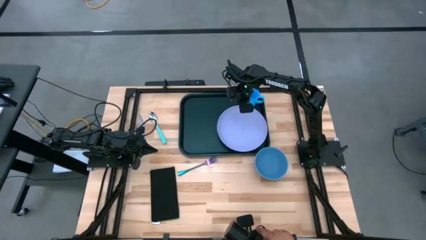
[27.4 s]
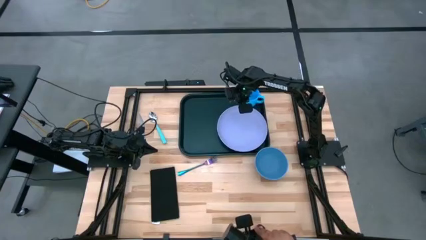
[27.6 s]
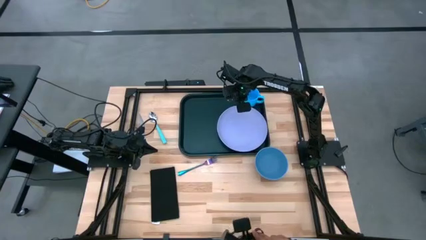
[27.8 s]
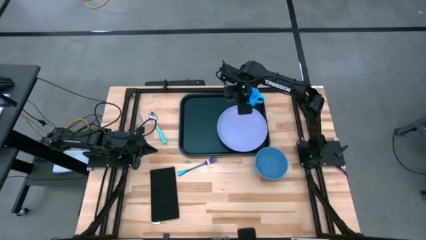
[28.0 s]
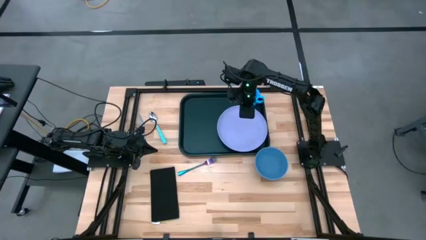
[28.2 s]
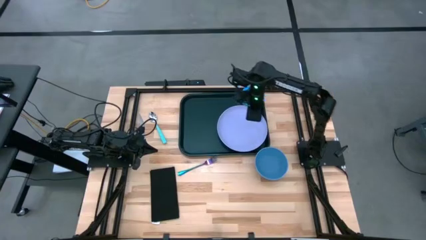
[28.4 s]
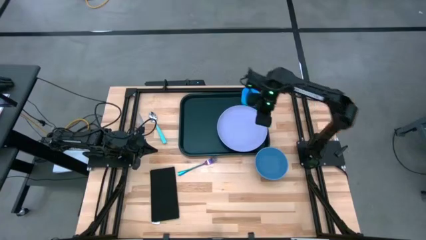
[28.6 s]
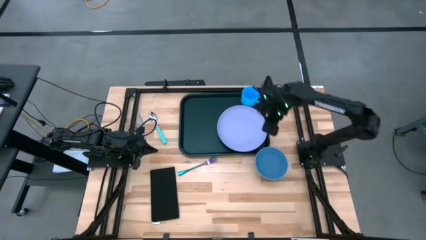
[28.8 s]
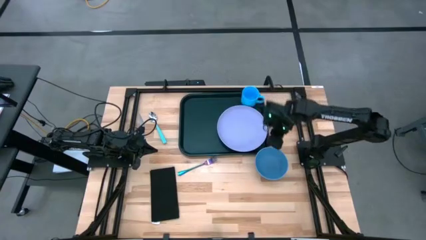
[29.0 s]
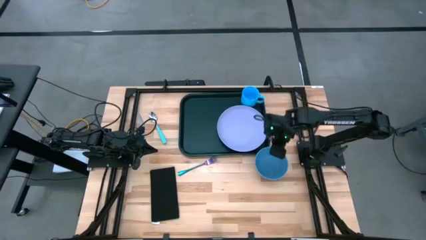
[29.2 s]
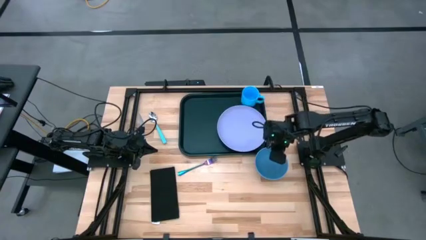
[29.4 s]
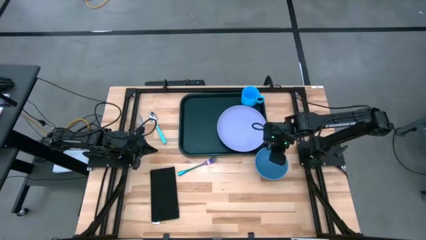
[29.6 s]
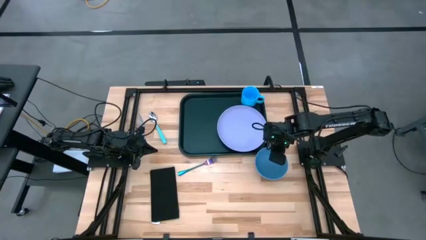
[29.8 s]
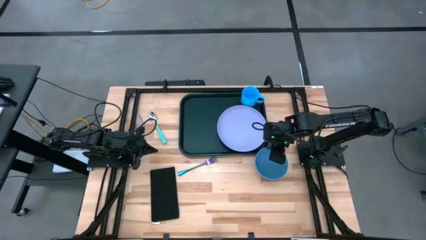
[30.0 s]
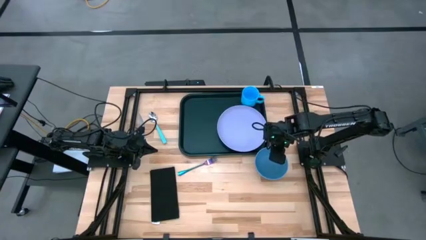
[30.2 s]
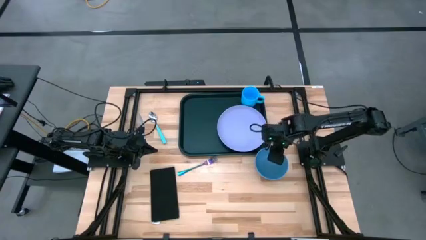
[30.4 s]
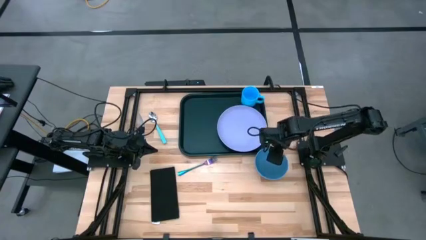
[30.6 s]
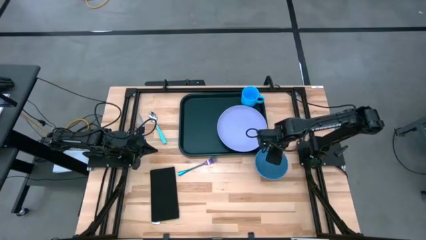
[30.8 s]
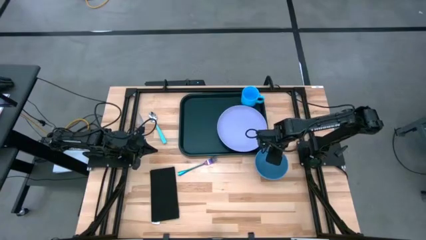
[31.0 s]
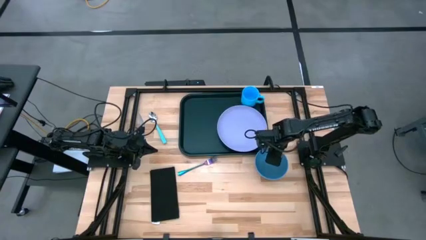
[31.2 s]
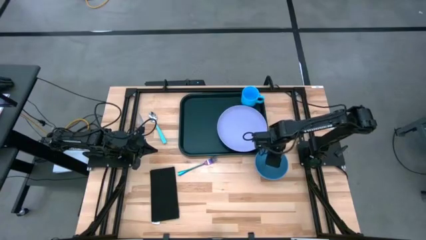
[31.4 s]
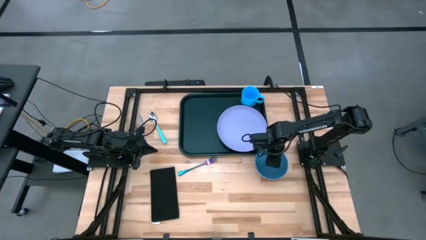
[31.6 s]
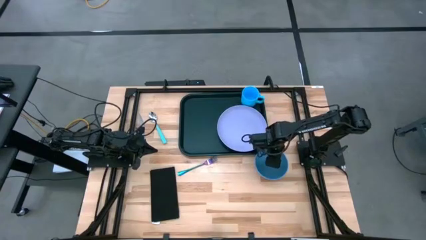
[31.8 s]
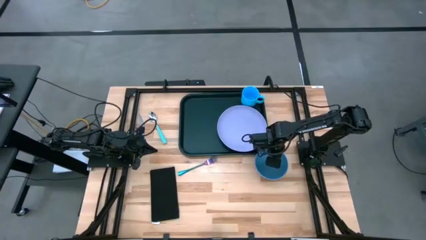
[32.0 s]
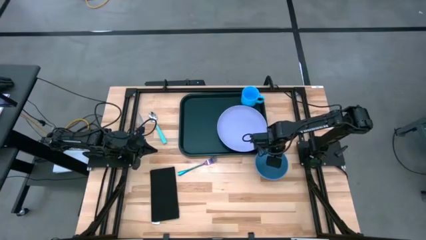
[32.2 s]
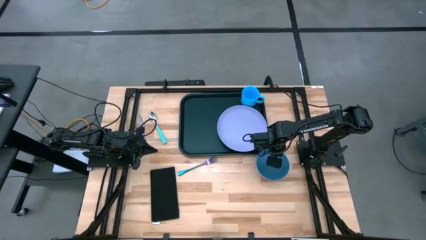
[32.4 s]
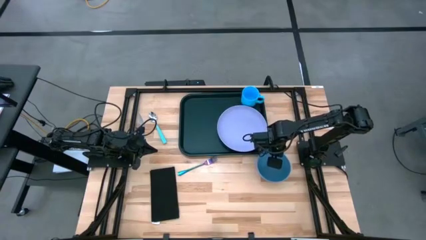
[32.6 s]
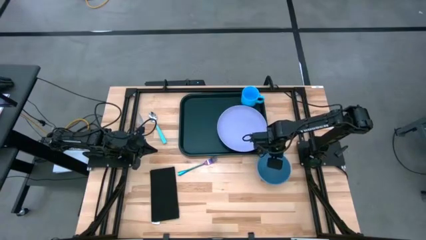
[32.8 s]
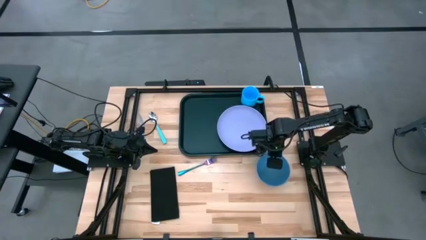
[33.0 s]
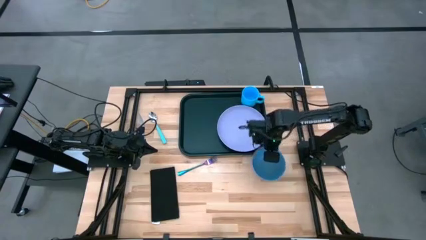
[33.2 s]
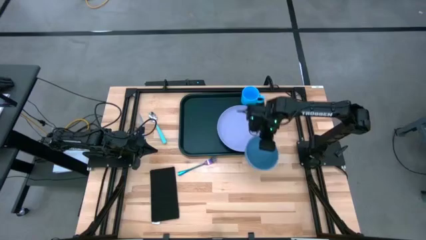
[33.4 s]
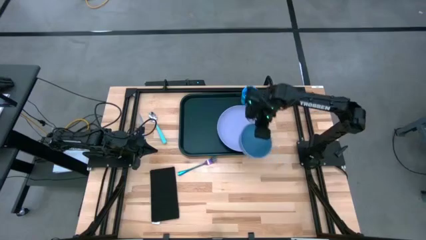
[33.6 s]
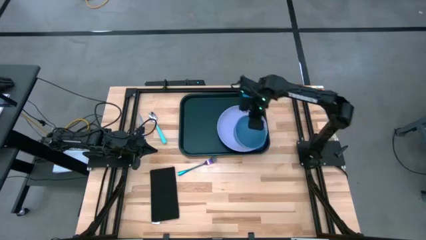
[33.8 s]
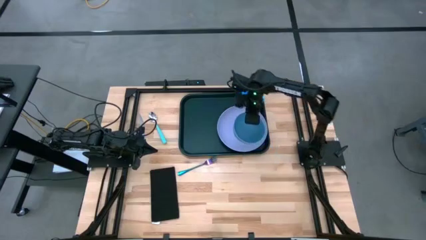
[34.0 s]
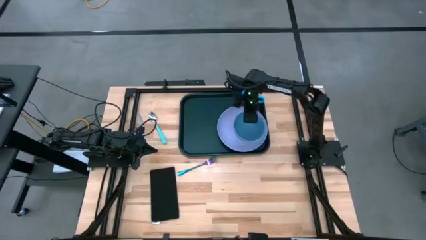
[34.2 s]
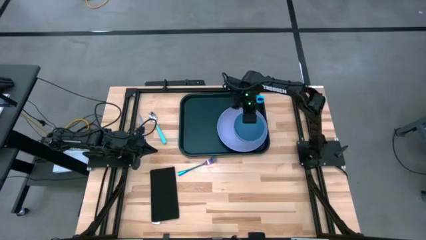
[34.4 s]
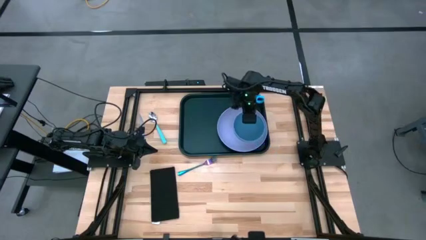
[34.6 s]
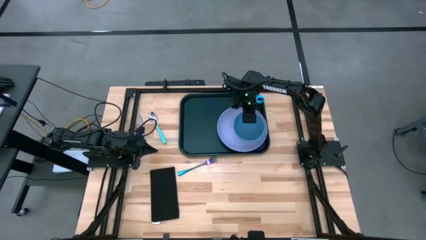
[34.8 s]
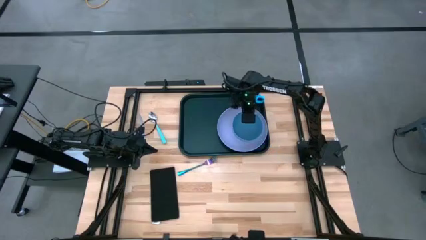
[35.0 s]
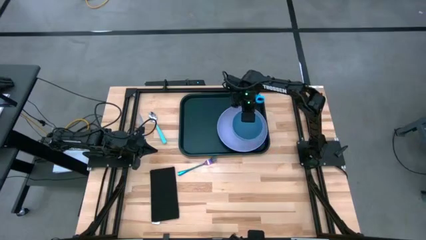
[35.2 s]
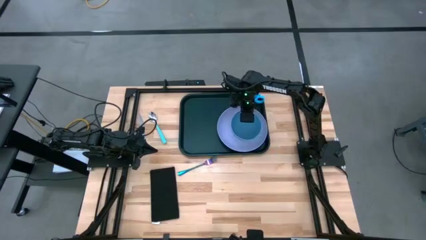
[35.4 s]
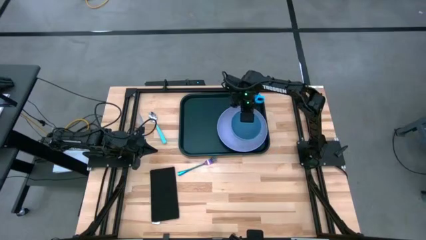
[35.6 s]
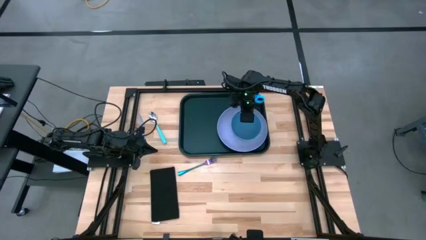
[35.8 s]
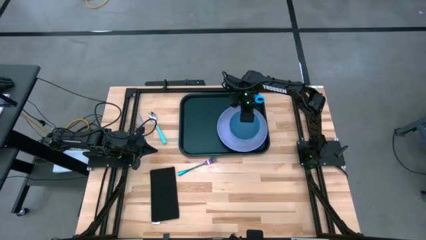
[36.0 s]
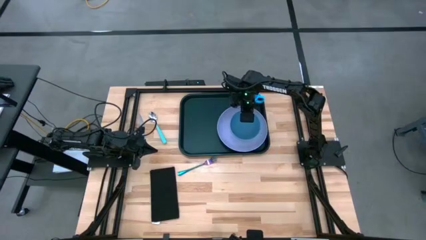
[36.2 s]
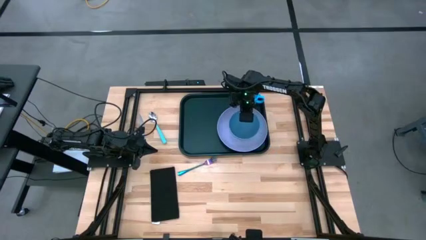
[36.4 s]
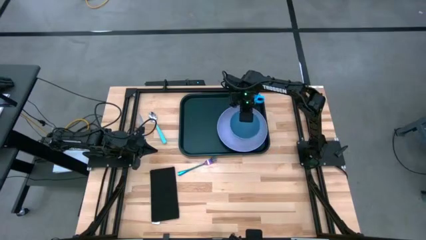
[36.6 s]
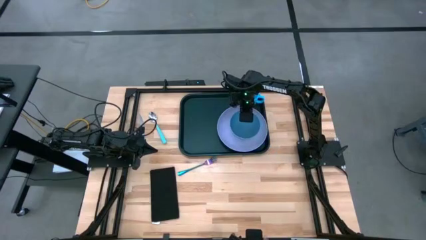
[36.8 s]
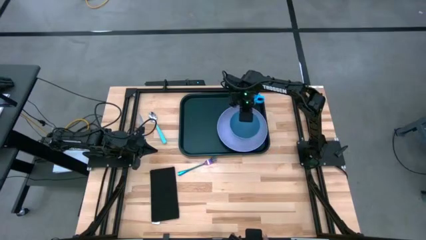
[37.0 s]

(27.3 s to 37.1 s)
Task: Set up tray
Put the blue bowl on the violet plate

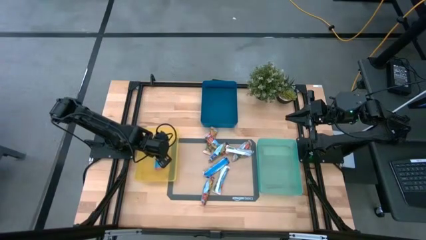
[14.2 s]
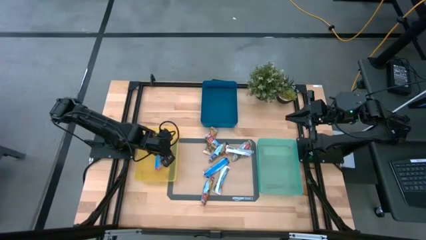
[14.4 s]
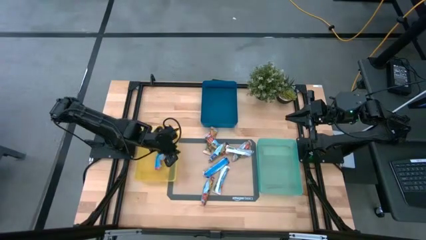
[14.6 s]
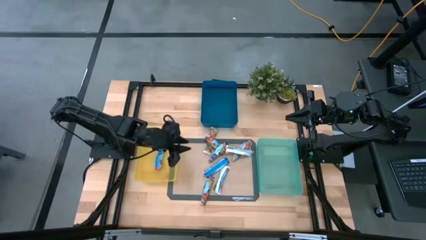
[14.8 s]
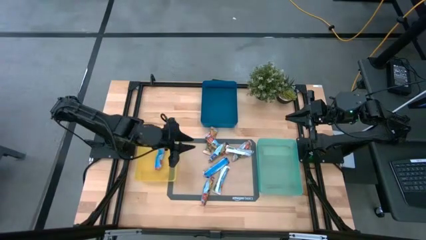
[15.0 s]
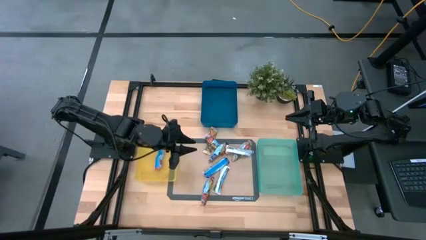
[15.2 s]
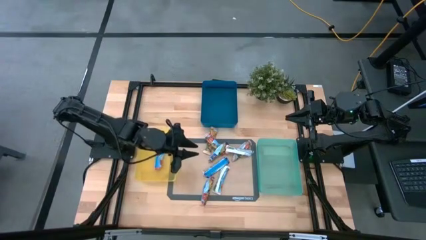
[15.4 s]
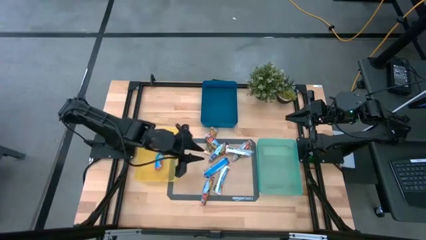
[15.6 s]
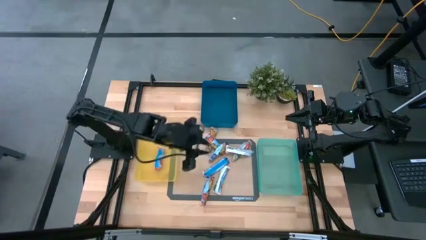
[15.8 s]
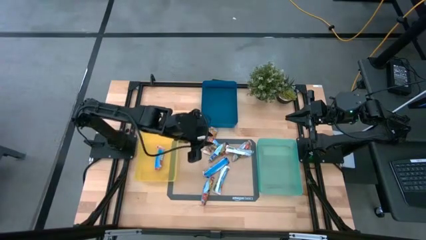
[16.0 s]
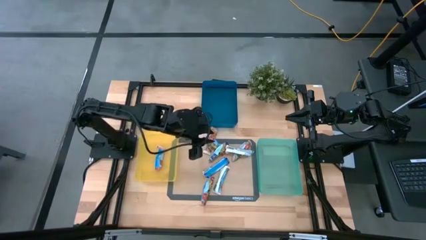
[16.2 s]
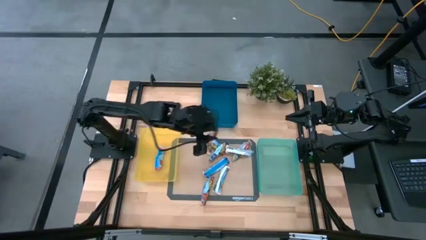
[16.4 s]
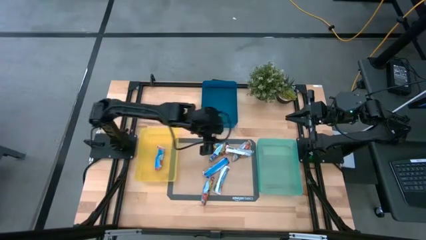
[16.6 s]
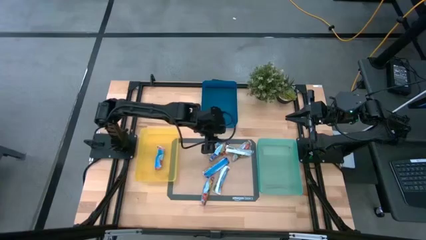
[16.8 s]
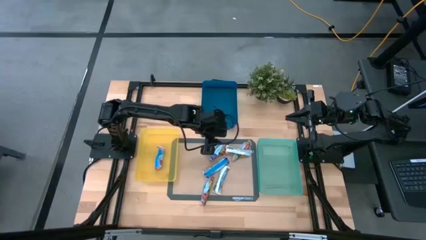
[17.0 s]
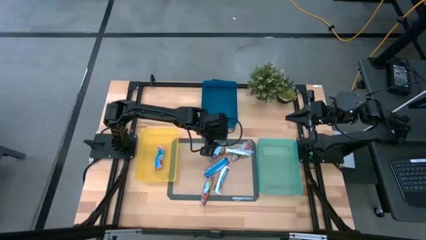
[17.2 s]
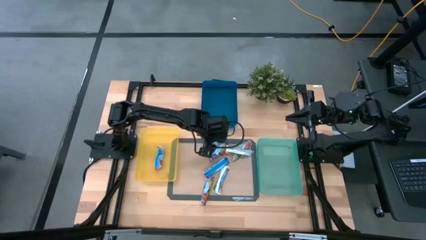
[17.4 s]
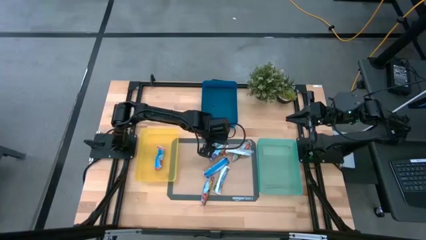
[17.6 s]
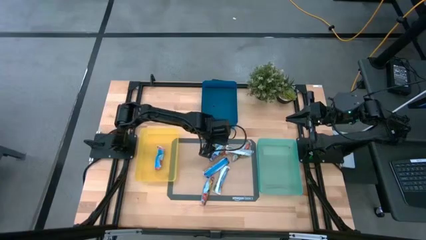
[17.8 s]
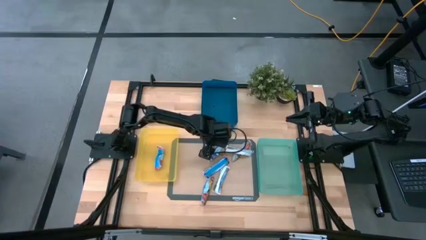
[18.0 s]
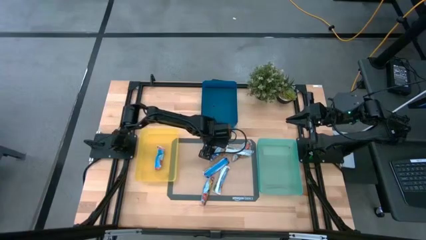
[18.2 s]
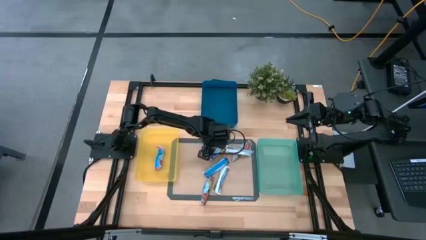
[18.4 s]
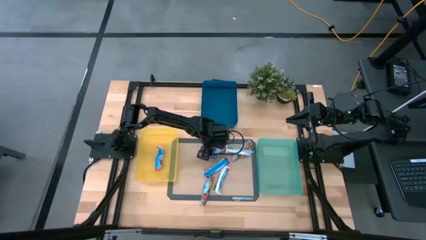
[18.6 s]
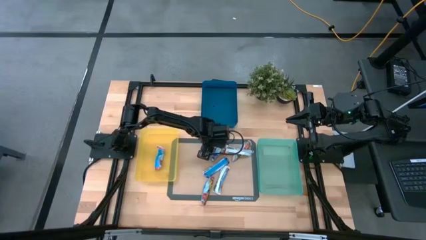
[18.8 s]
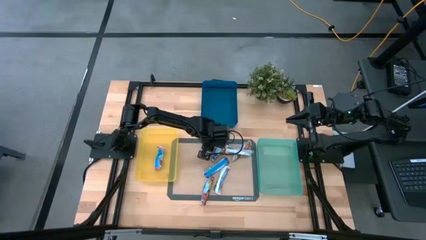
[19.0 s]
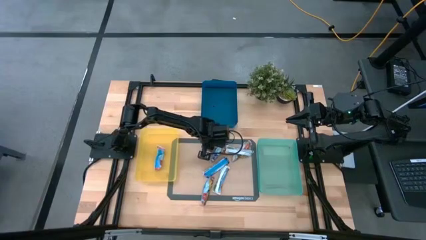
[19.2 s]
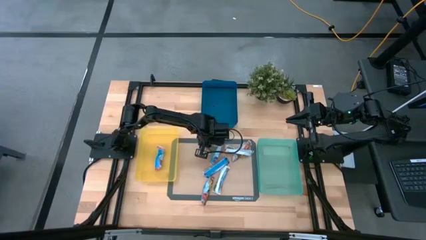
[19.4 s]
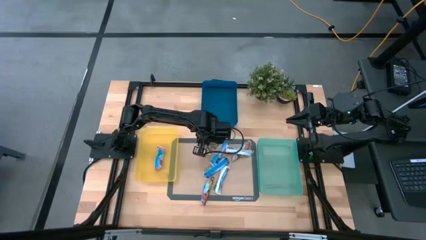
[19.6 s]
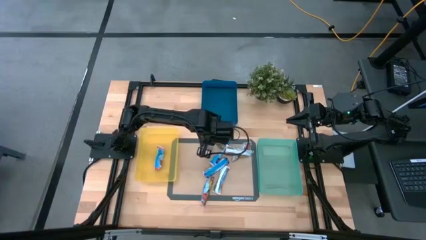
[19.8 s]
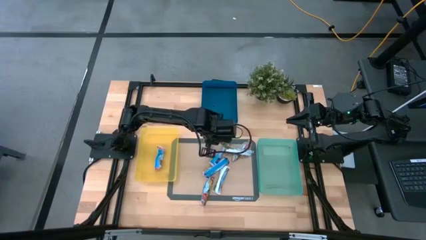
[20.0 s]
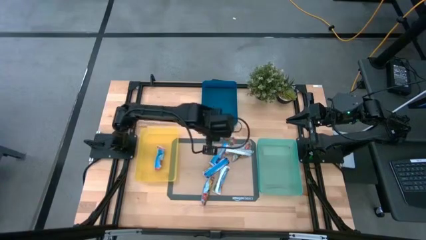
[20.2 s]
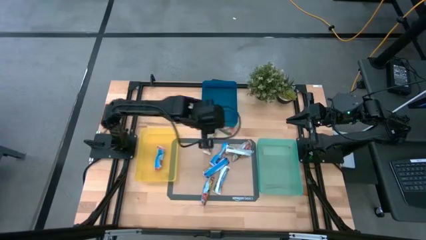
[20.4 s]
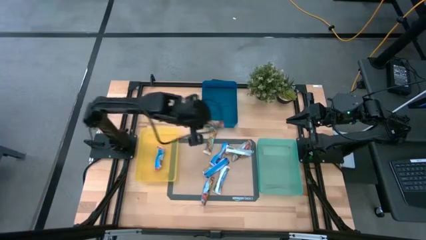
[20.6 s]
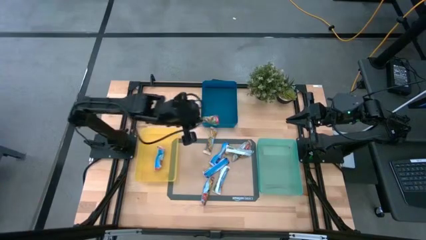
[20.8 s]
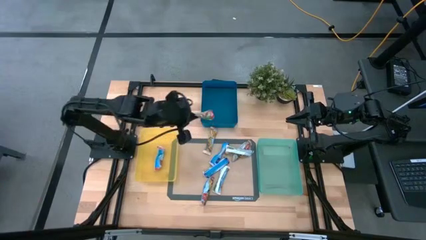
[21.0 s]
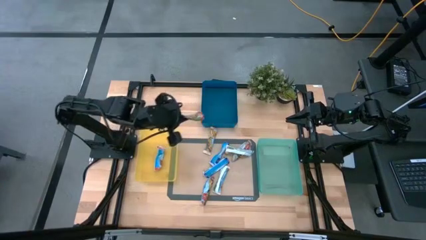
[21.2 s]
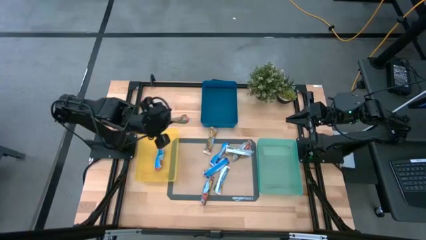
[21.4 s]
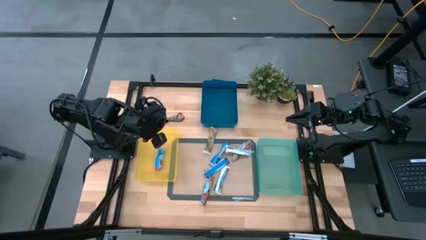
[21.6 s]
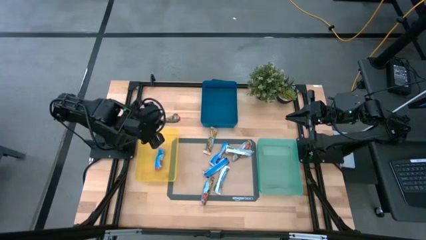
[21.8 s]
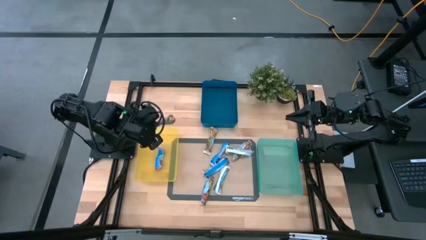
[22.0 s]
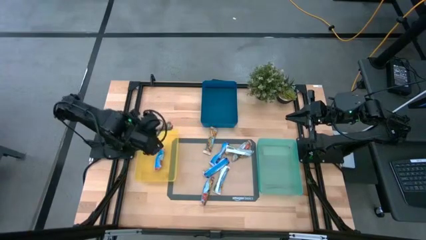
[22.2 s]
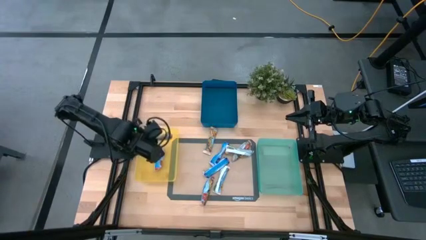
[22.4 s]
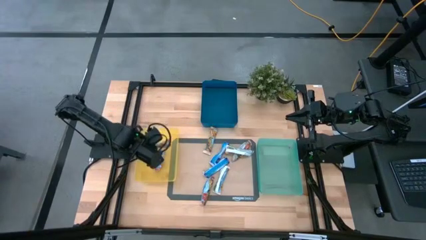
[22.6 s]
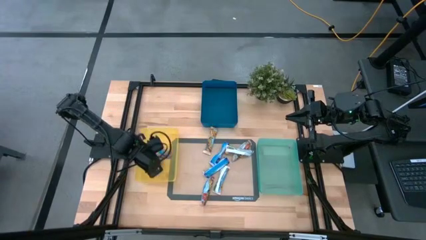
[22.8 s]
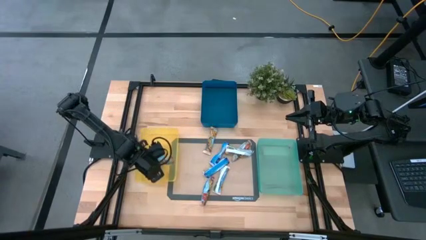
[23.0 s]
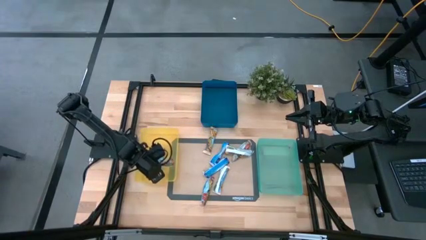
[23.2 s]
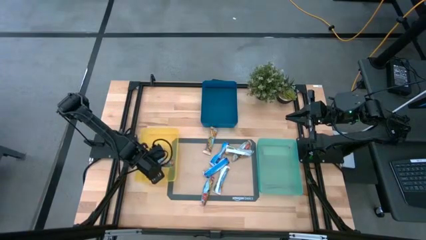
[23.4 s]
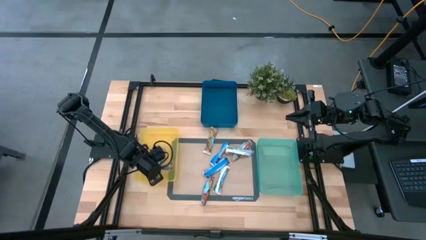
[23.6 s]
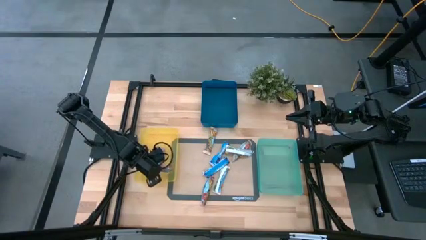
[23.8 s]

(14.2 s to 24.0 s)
Task: Pick and place Granola Bars by type
Put the red granola bar into the yellow bin
